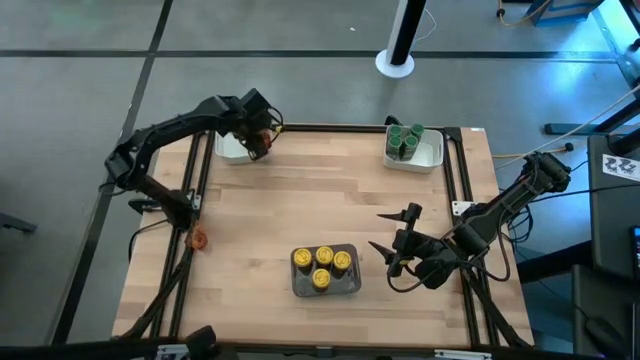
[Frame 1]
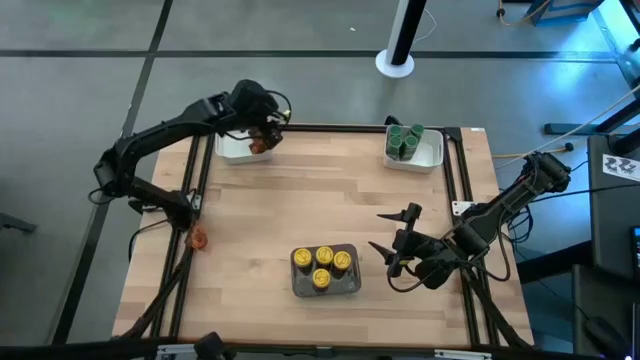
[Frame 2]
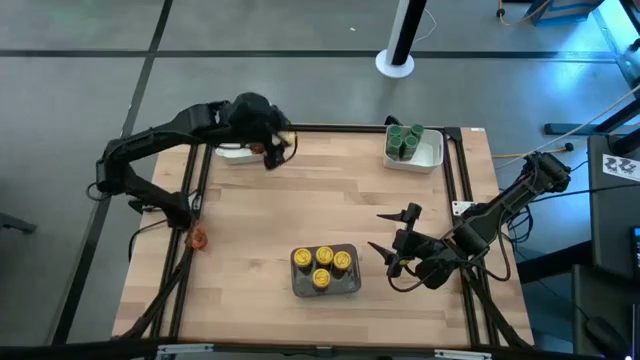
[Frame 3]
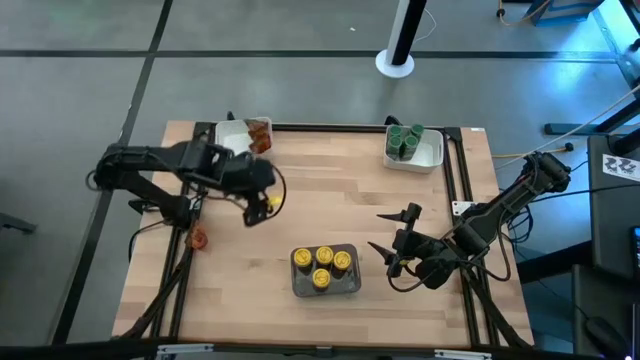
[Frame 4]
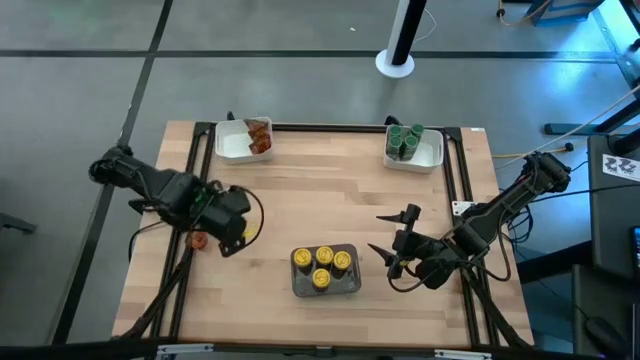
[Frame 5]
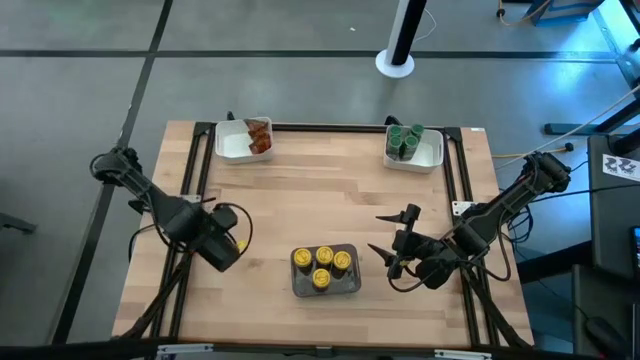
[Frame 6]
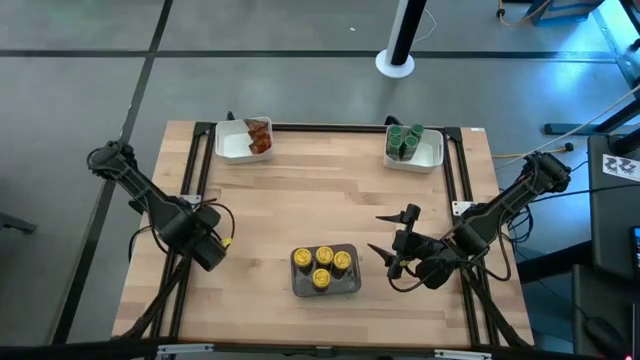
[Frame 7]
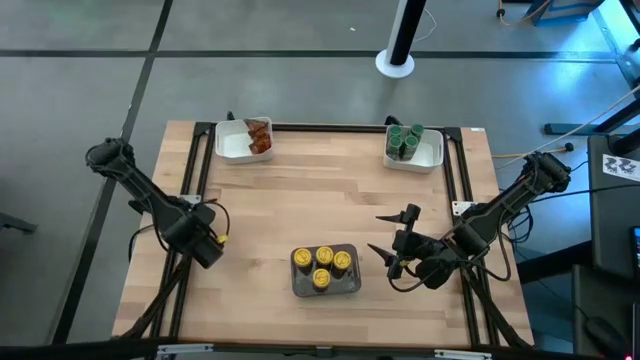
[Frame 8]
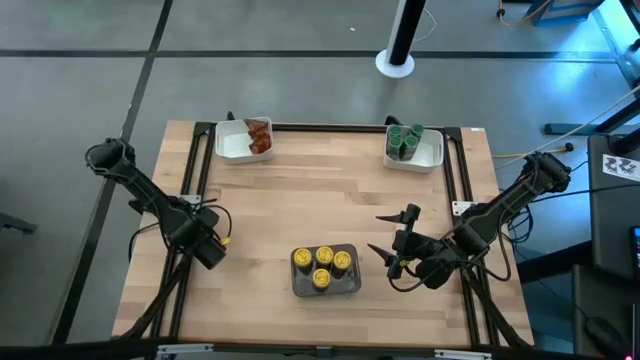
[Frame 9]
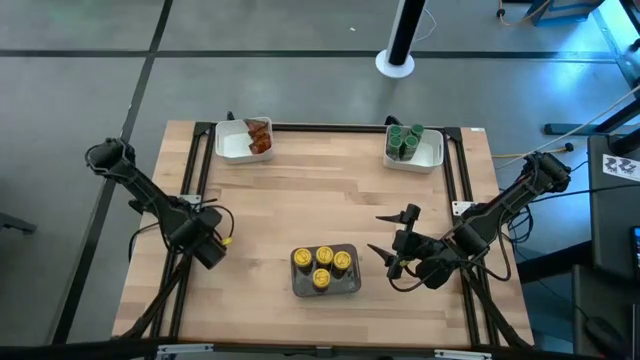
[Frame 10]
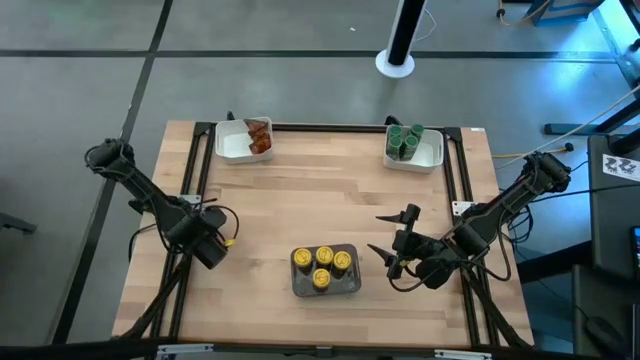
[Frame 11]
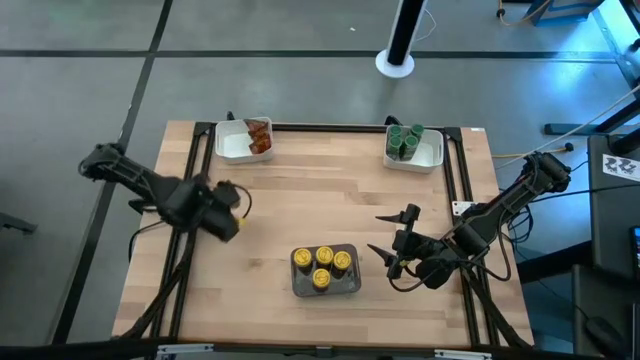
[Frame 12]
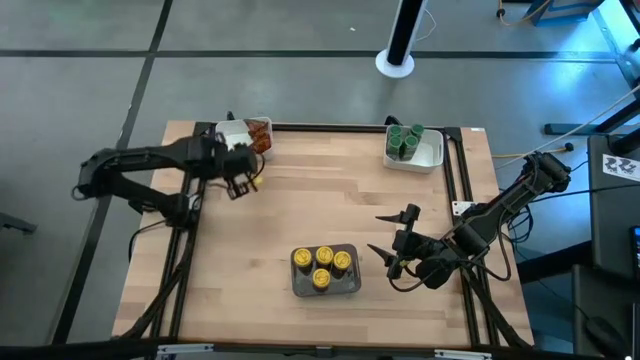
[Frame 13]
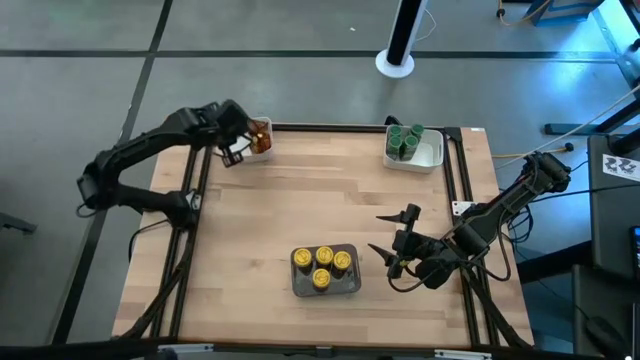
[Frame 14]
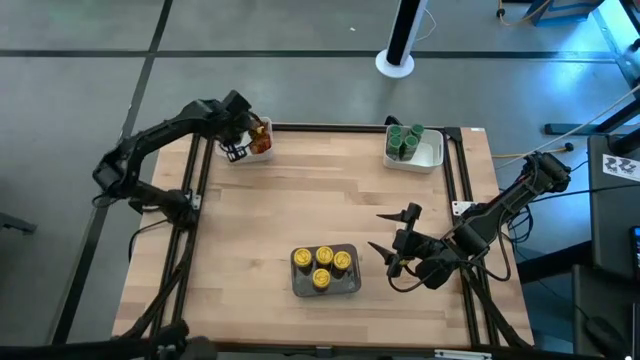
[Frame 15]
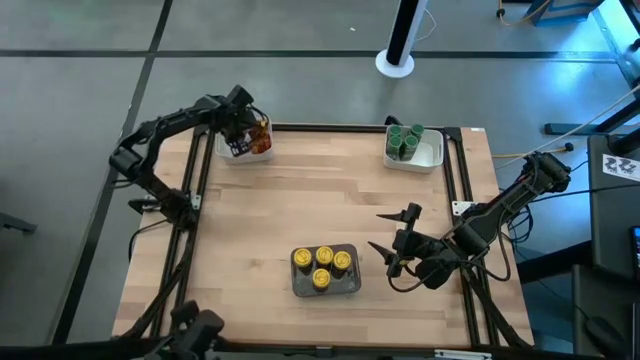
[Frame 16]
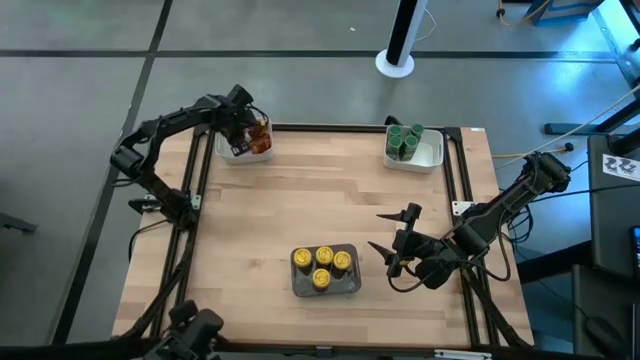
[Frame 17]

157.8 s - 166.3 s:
Task: Sort spices by type
Put the orange seasoning bag into the left white bin

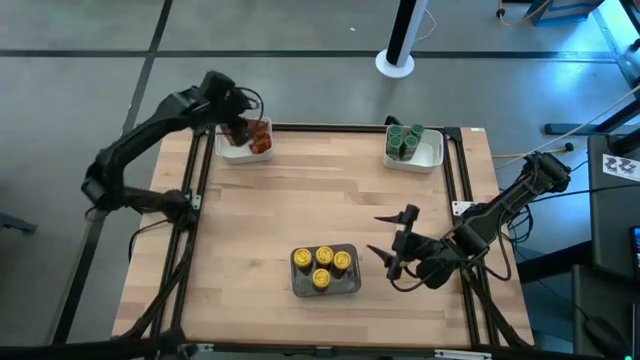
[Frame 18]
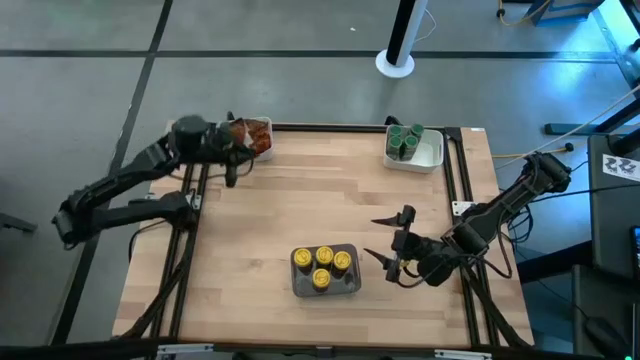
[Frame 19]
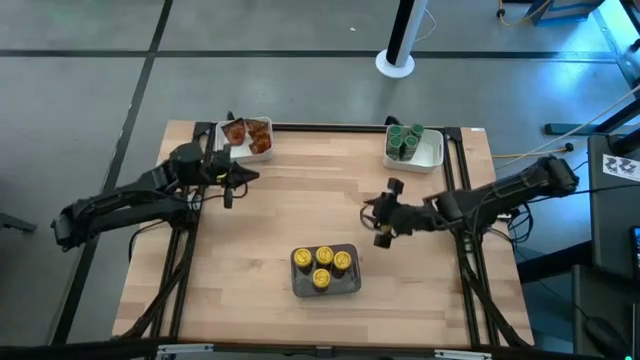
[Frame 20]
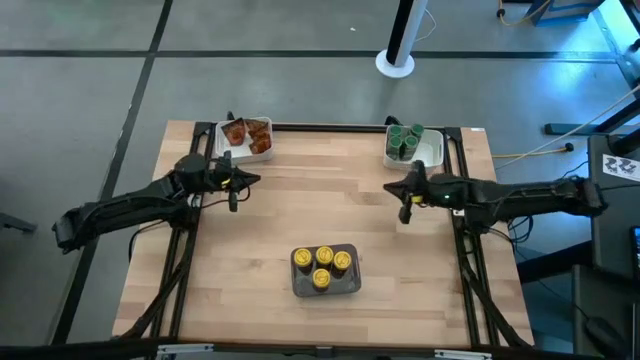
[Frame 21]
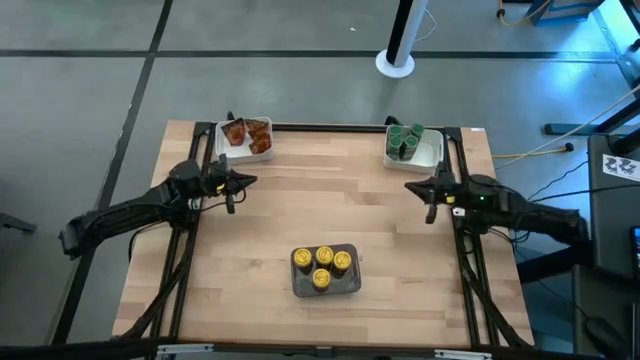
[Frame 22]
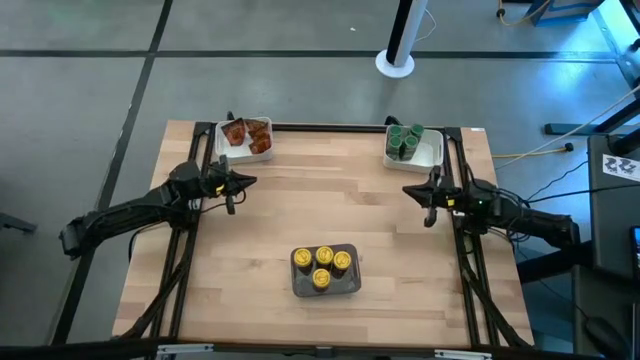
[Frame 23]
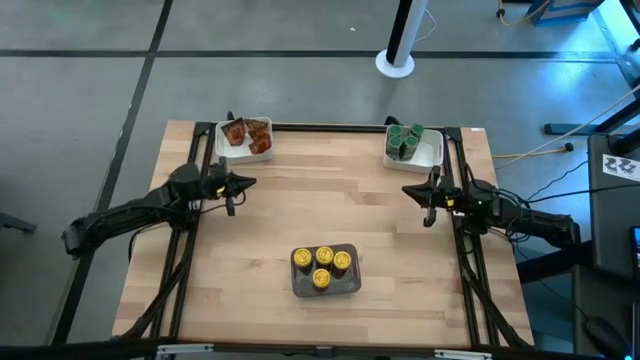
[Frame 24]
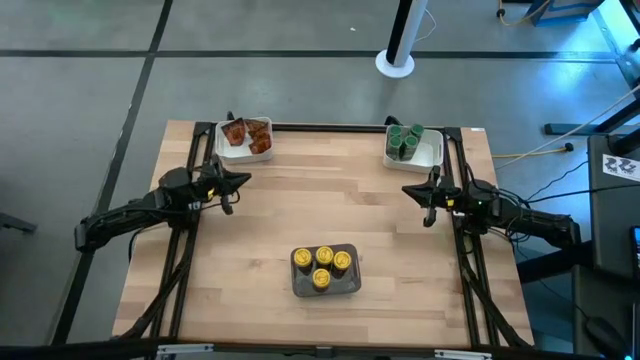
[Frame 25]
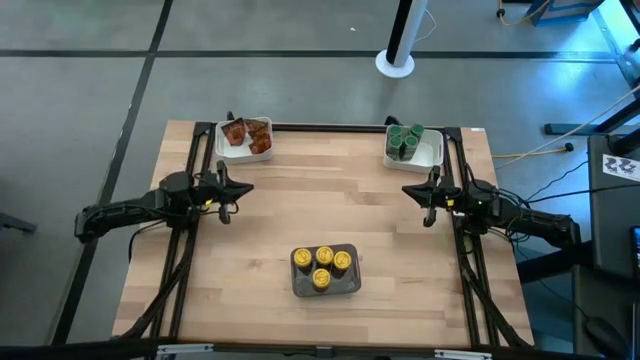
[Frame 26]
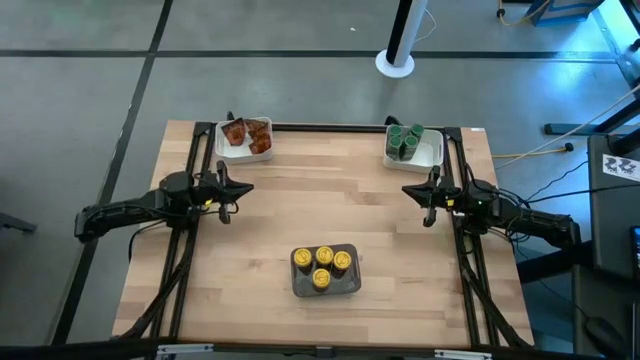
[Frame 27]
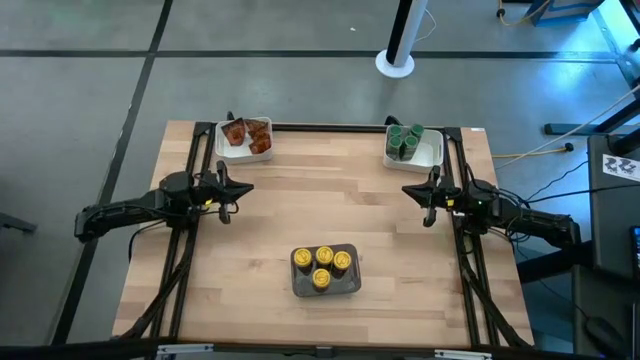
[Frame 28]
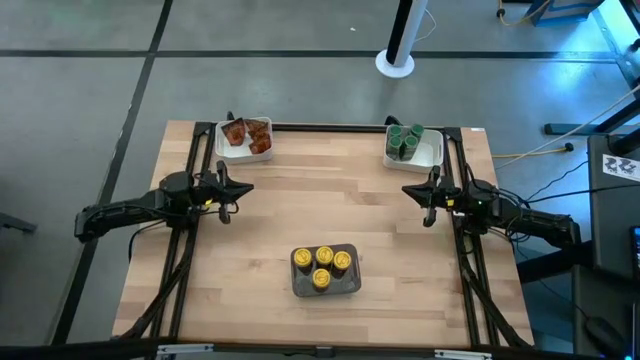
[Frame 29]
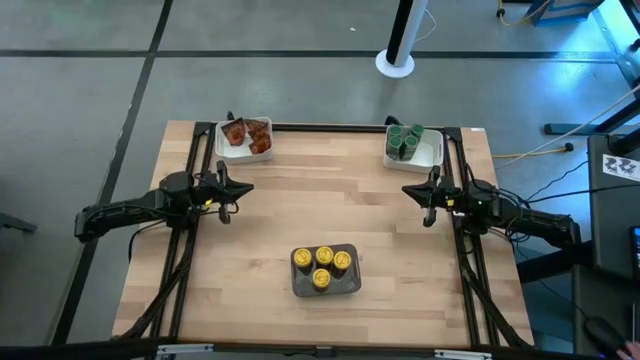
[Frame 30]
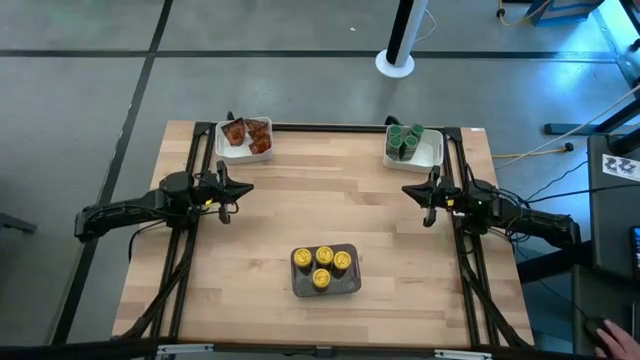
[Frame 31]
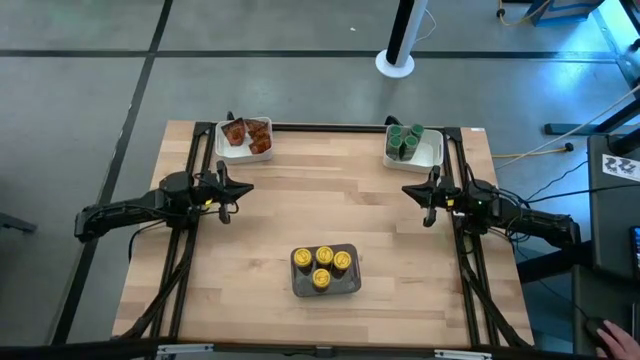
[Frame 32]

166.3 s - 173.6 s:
Return to Home Position

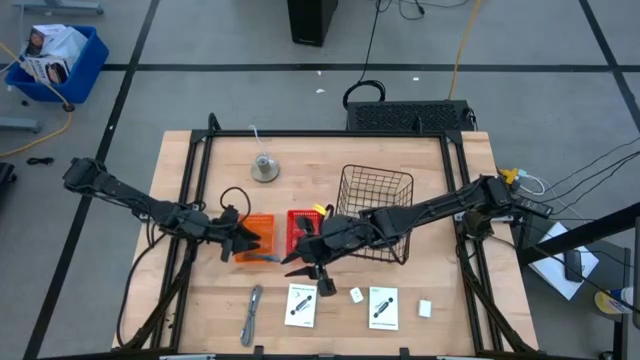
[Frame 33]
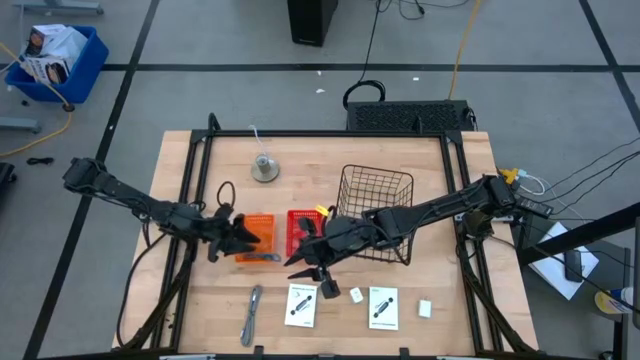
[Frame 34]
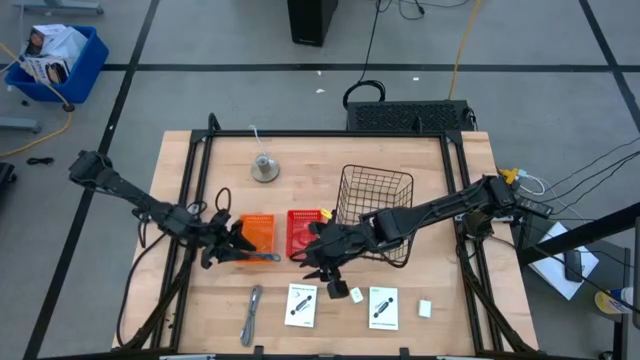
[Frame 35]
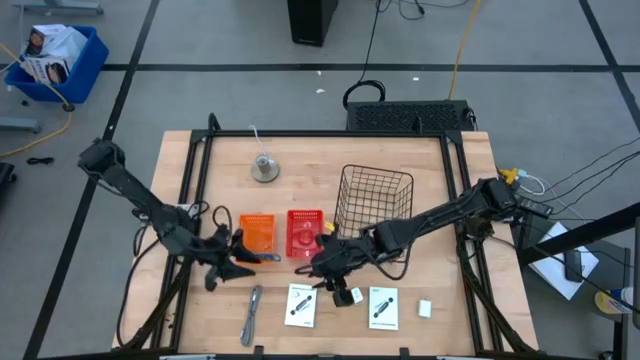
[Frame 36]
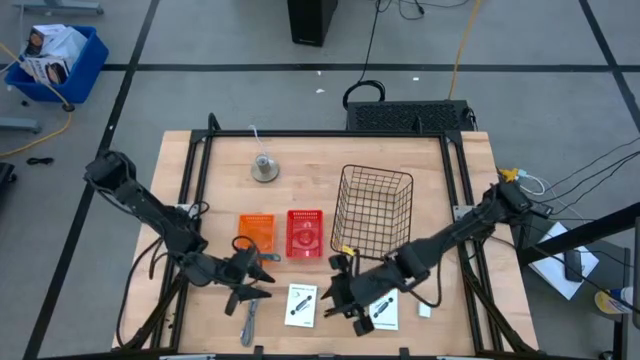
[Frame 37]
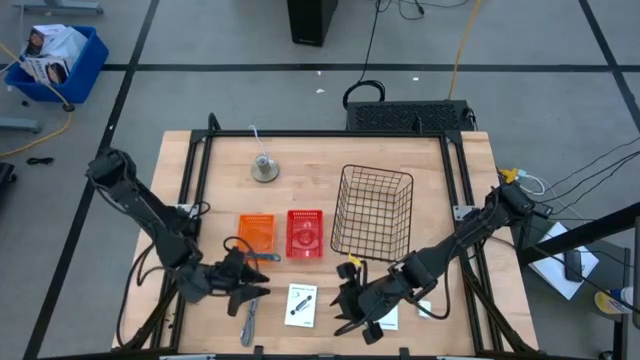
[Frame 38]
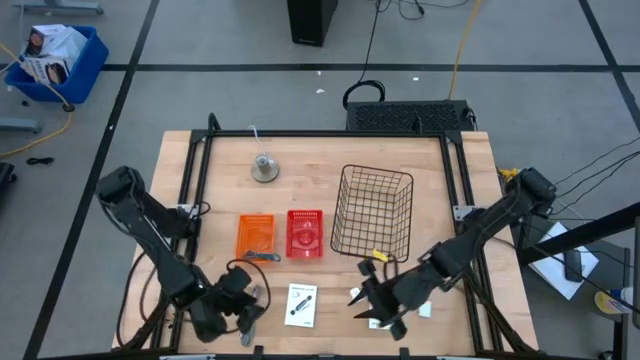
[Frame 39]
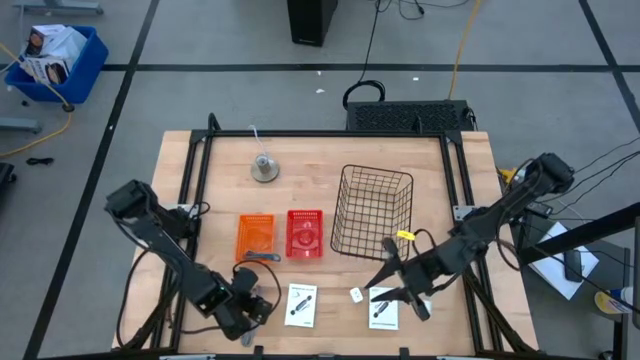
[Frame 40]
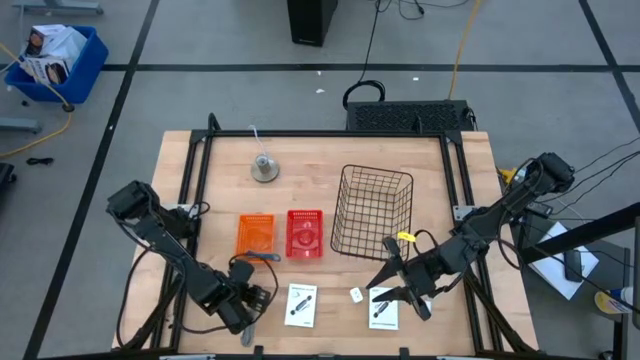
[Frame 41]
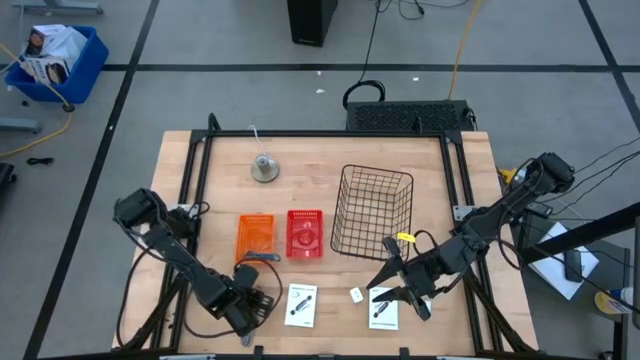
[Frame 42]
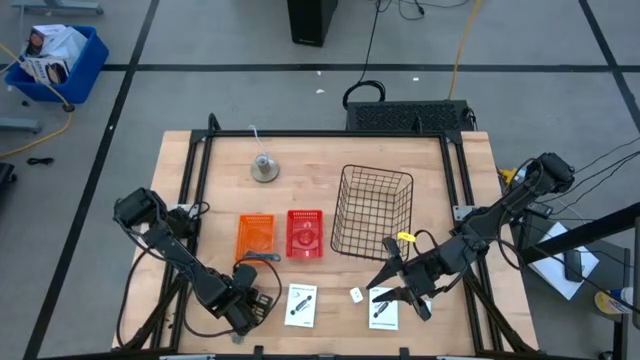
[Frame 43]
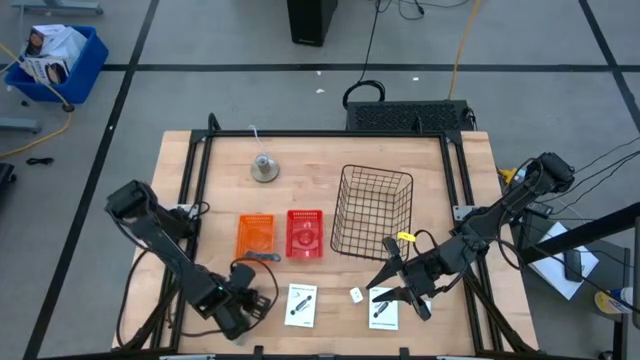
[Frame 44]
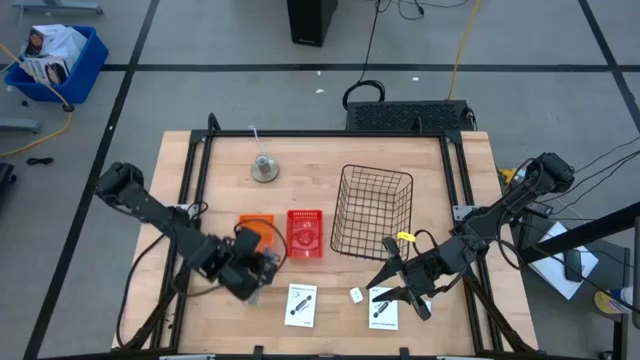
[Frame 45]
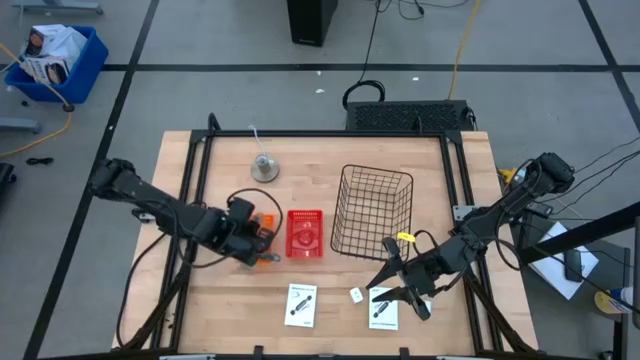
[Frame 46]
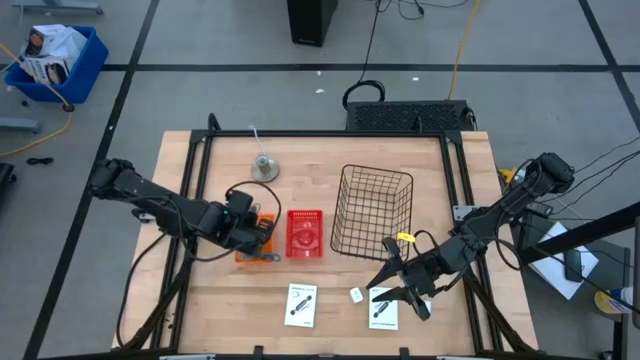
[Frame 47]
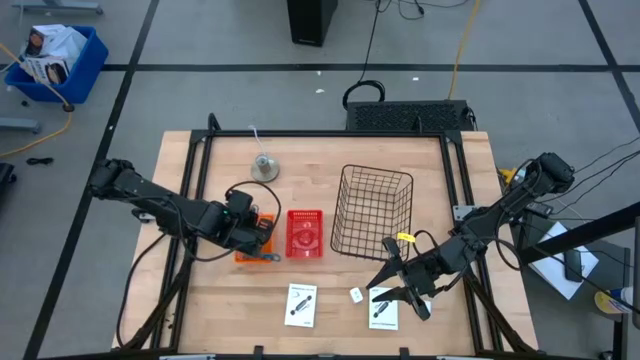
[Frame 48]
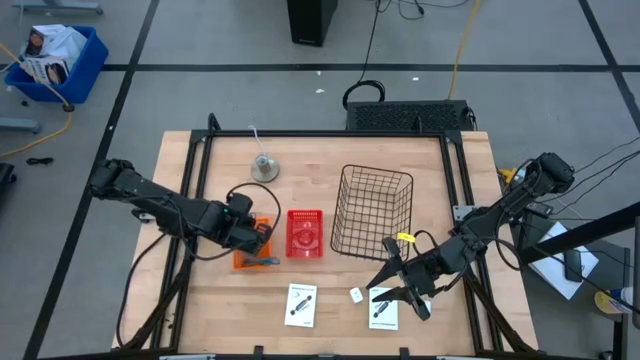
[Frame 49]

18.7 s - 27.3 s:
Task: Pick and place items into bin
Put the white charger cable into the orange bin
